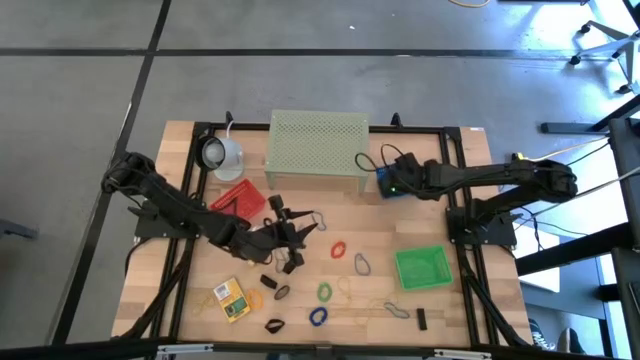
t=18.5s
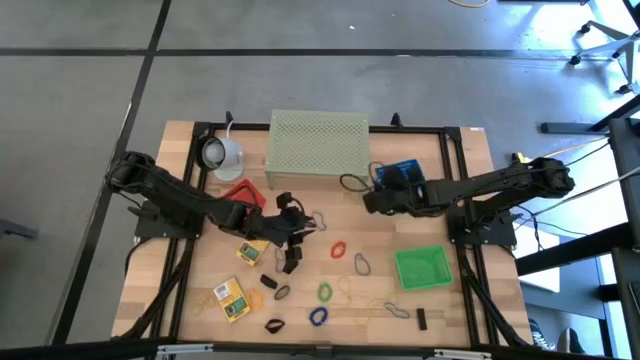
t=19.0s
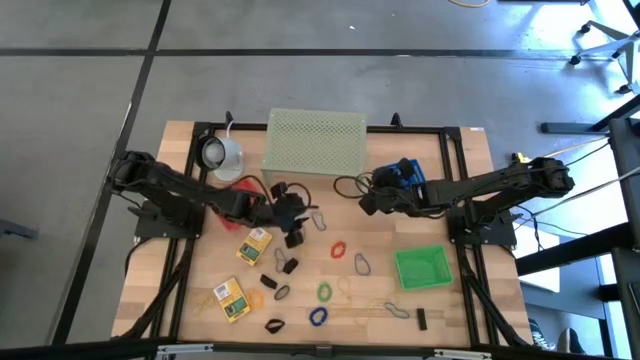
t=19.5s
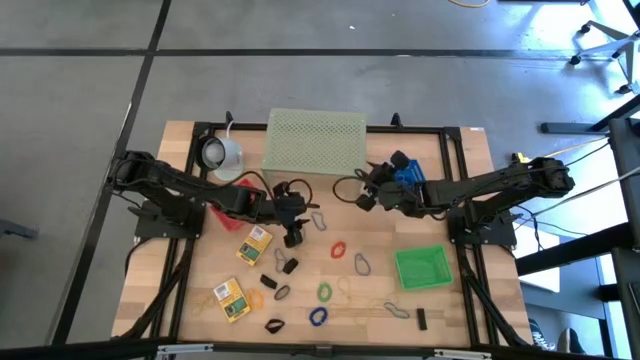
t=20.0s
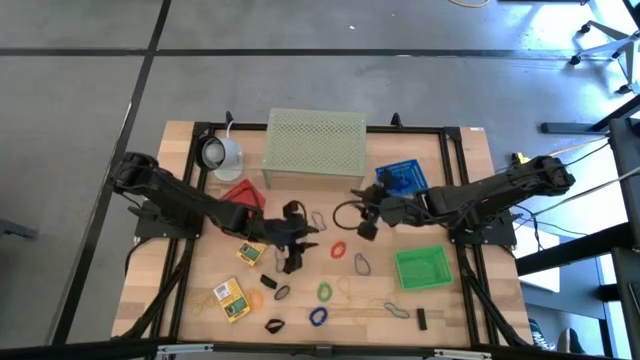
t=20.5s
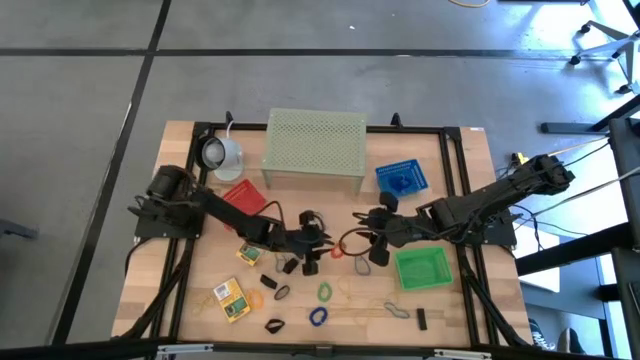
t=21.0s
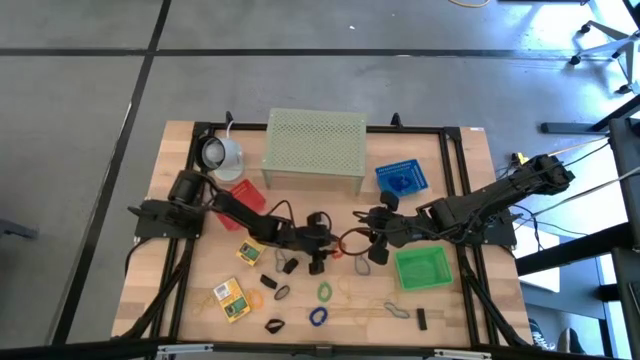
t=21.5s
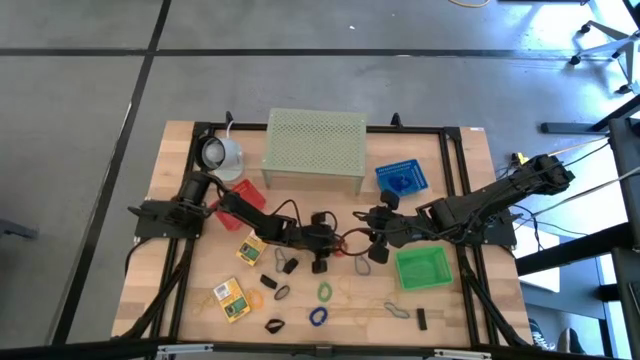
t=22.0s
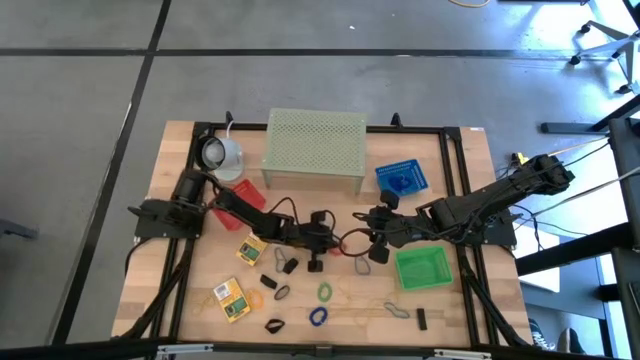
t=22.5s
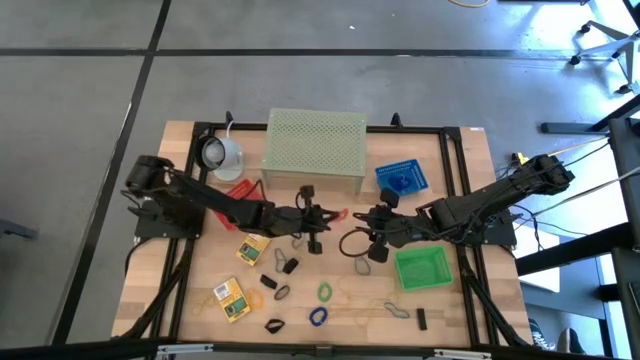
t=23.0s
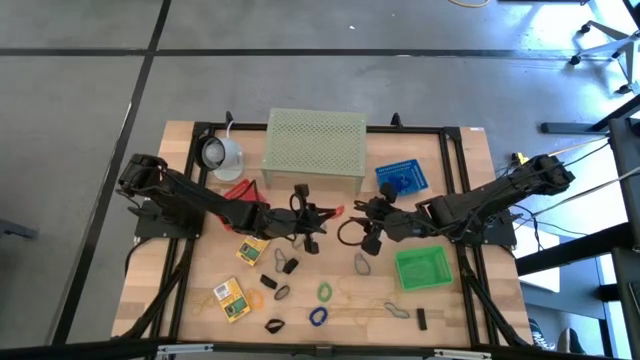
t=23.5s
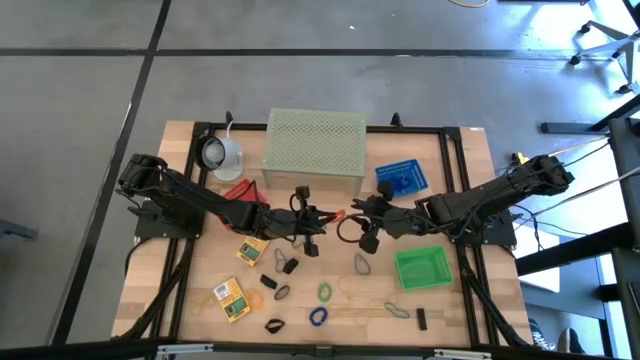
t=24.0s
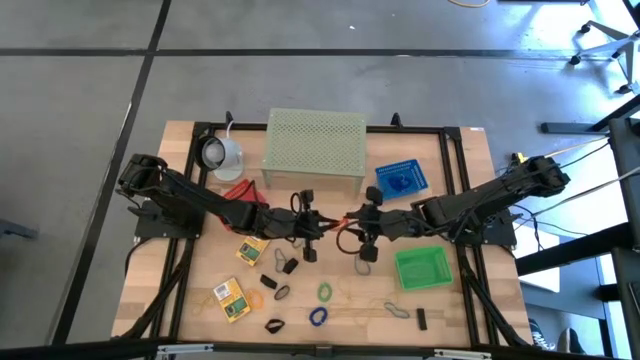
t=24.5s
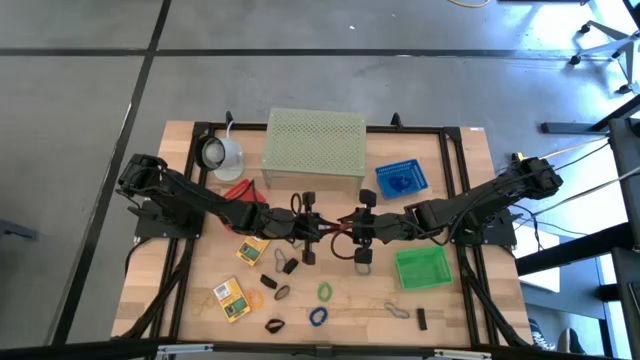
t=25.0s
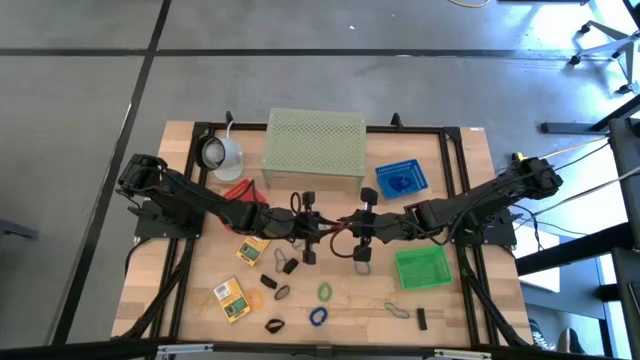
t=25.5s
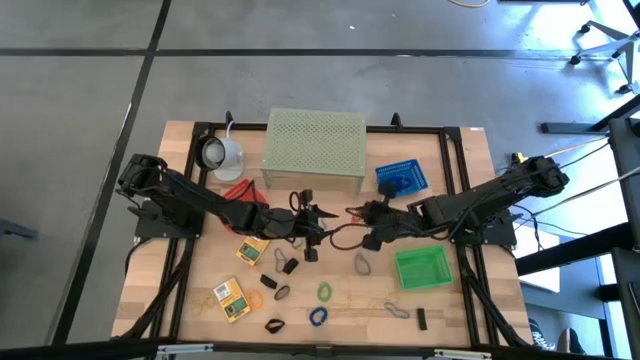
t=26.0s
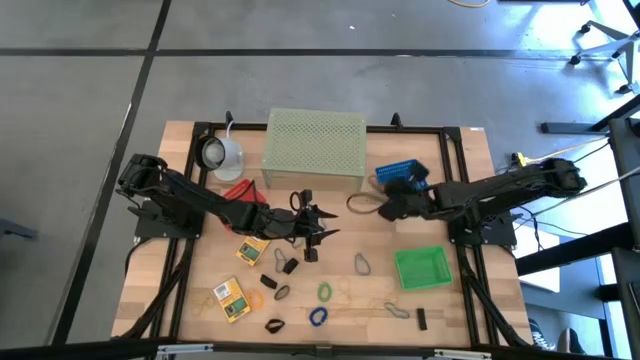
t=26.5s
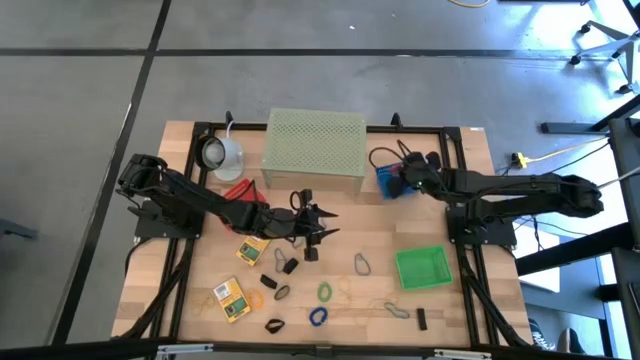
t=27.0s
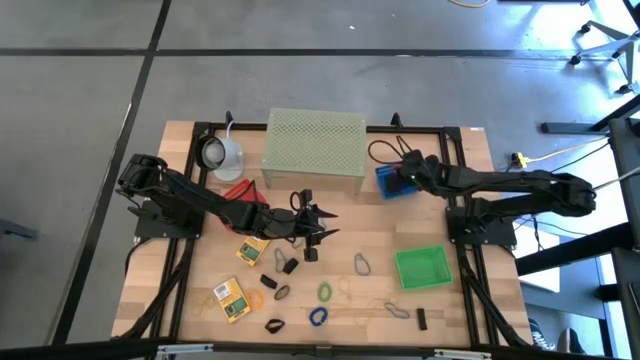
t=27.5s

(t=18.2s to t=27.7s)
Task: Pick & Place Office Desk Supplies
Put the orange spring keychain into the blue bin

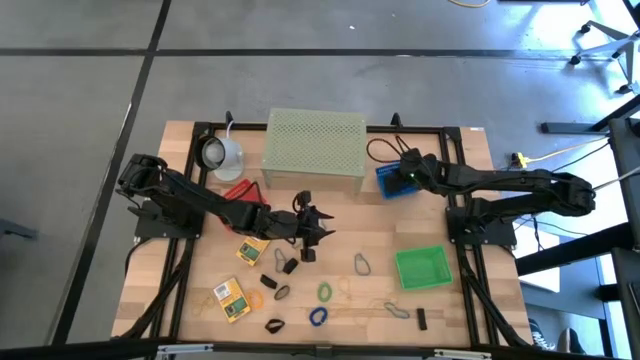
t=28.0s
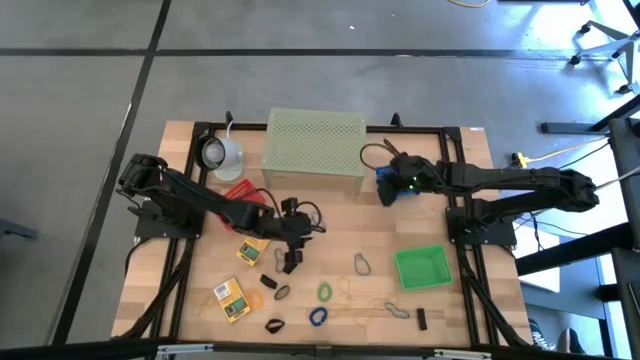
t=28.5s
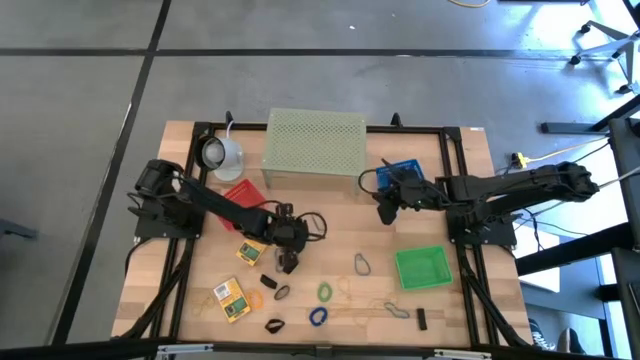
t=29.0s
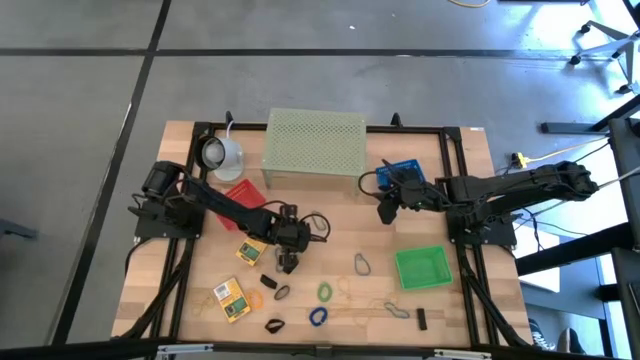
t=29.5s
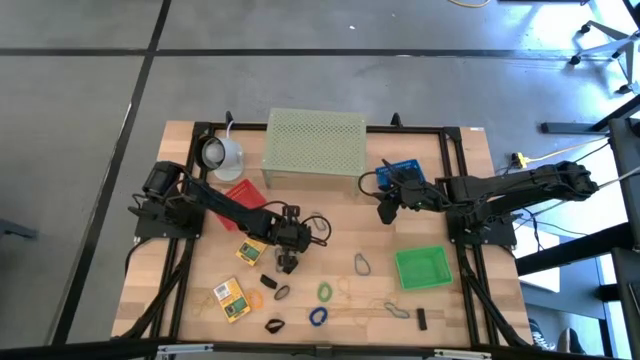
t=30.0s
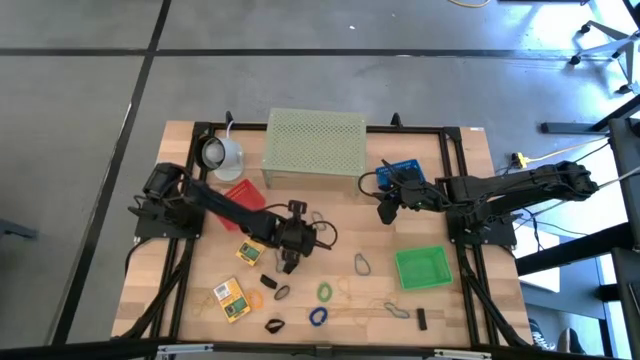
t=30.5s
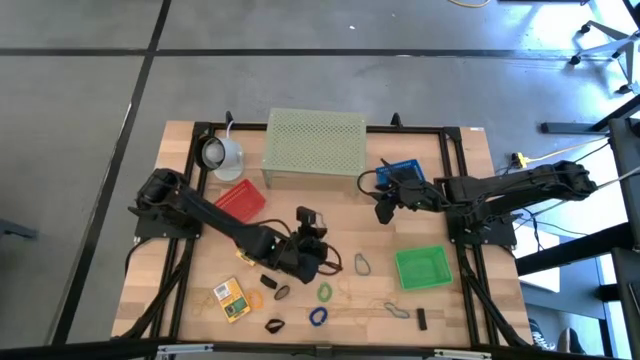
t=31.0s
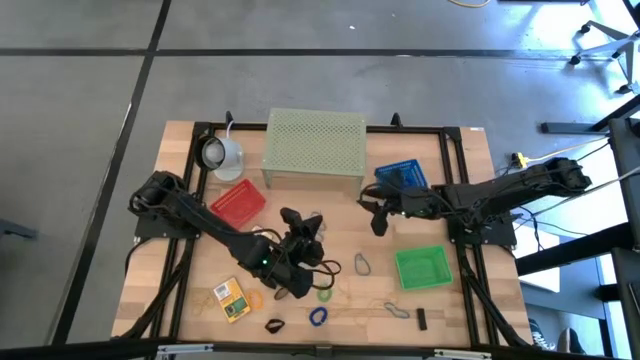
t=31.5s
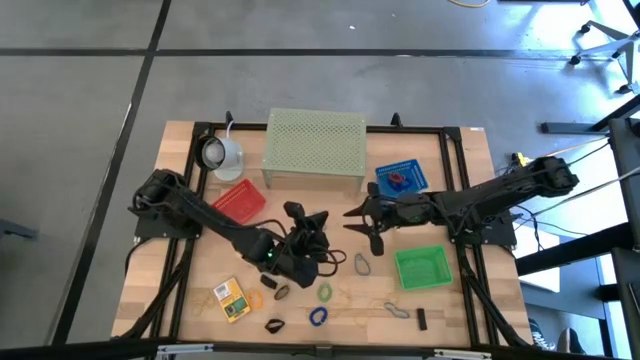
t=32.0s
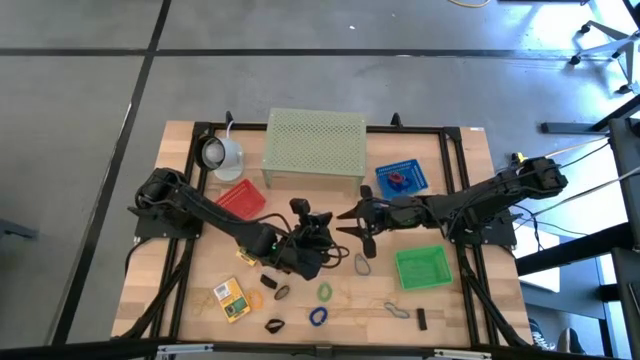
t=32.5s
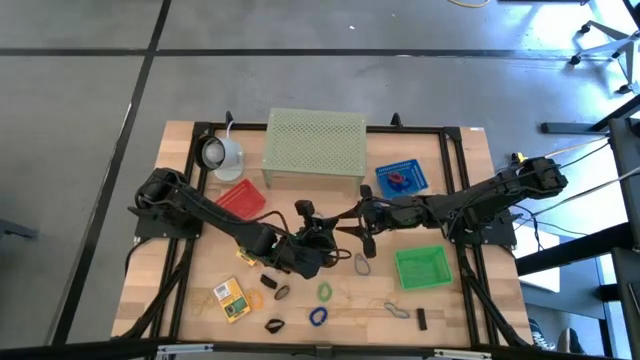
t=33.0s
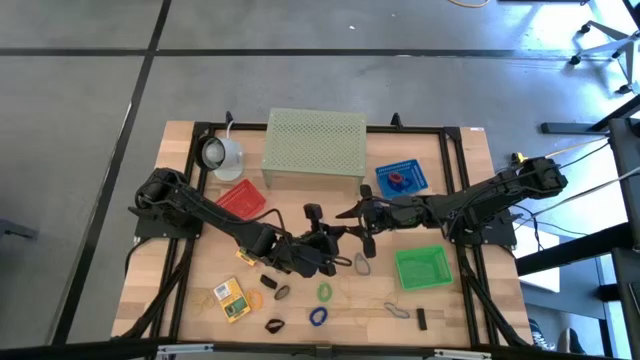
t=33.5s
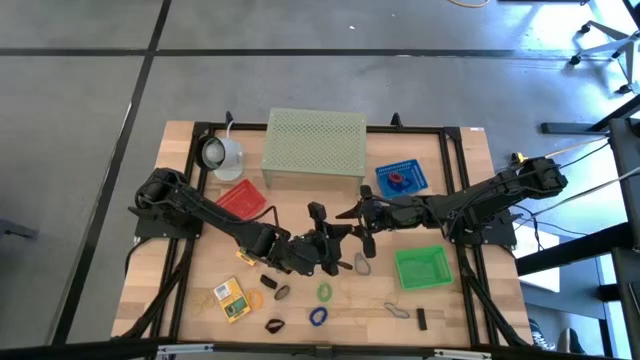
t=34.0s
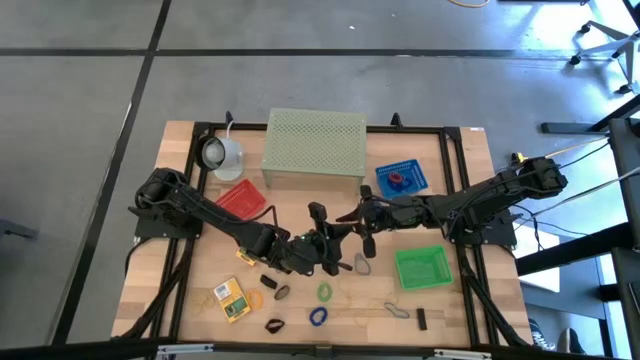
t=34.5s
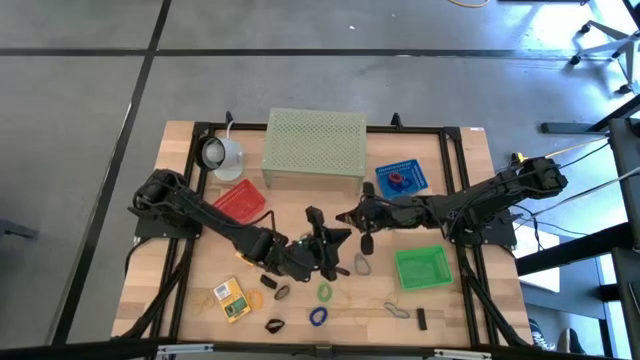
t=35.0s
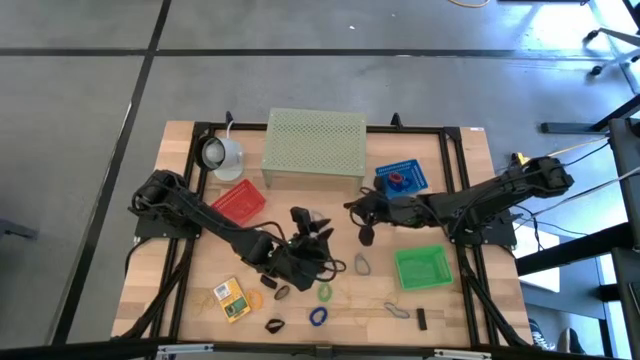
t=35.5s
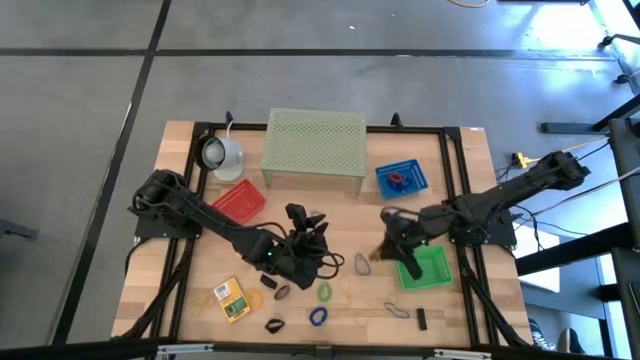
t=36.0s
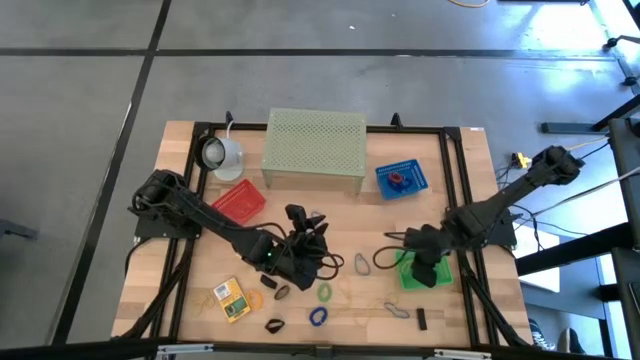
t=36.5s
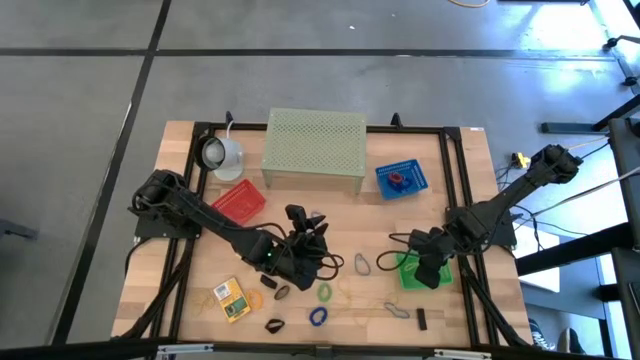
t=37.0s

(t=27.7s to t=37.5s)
Put the yellow rubber band into the green bin

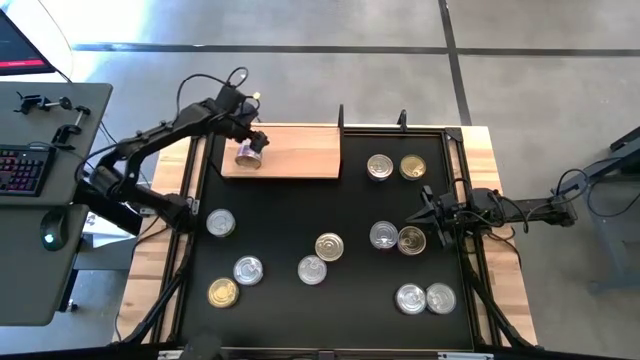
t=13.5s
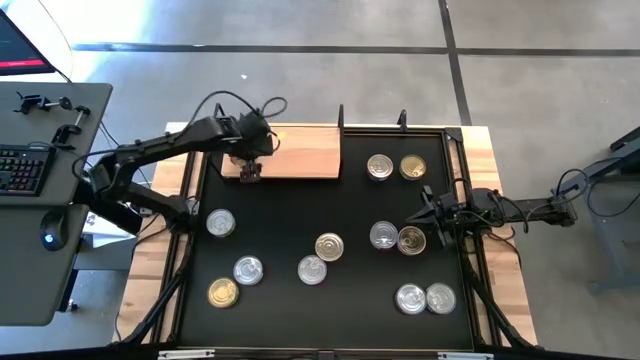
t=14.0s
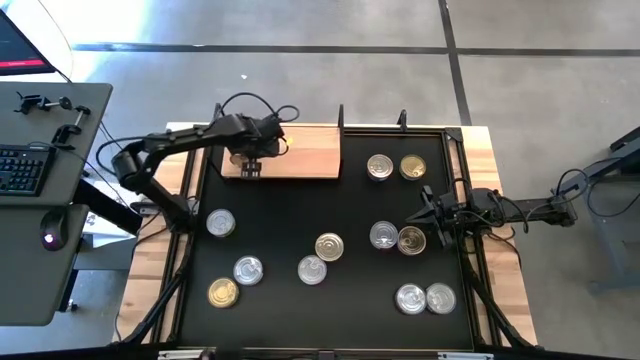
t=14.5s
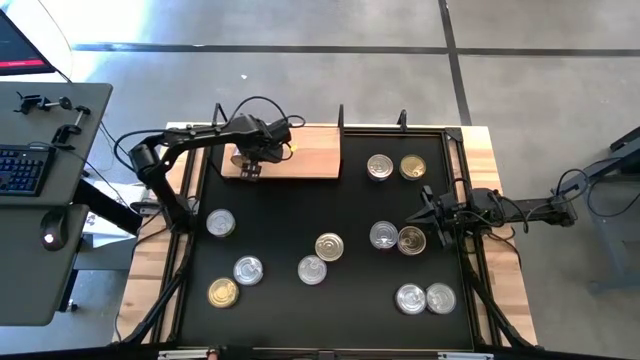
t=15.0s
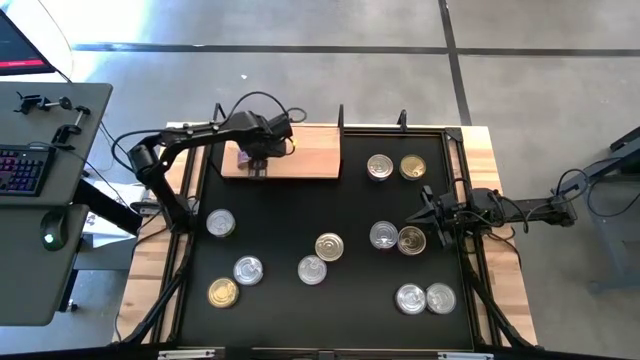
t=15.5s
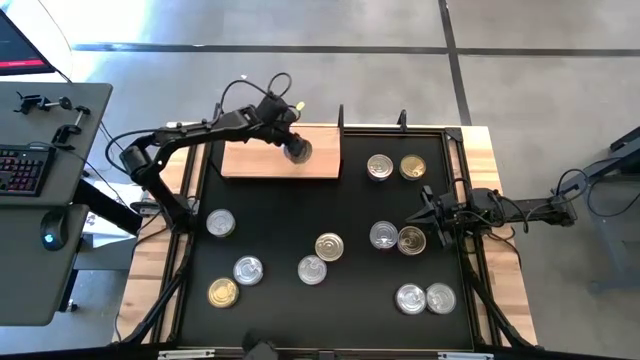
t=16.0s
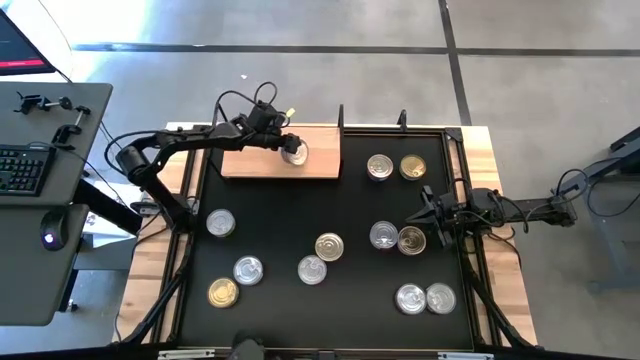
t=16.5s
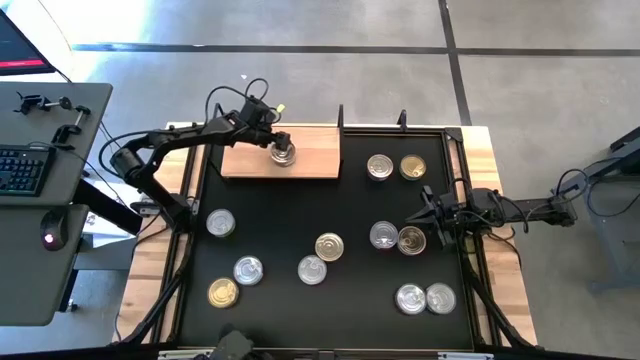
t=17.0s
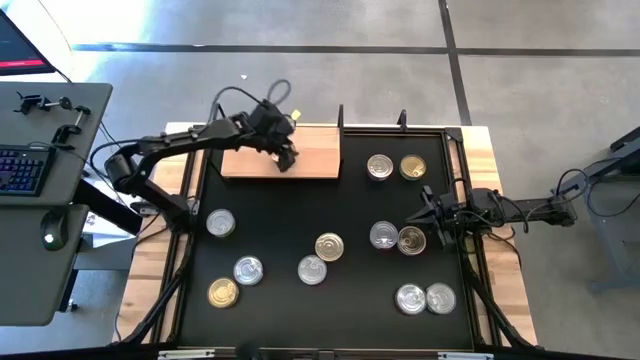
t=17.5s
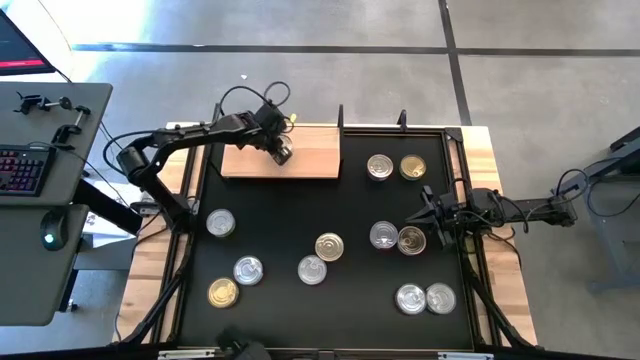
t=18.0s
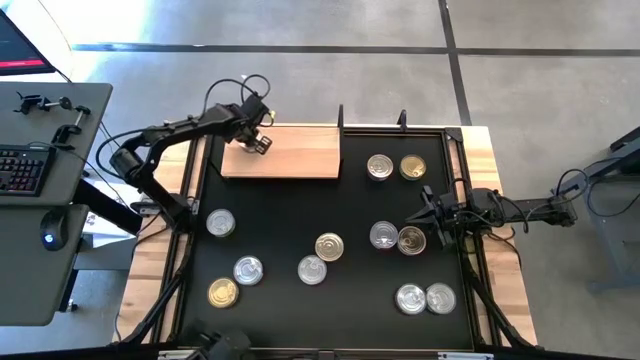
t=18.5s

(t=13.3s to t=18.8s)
Task: Stack canned seafood by type on shelf
Put the blue tuna can on the shelf
